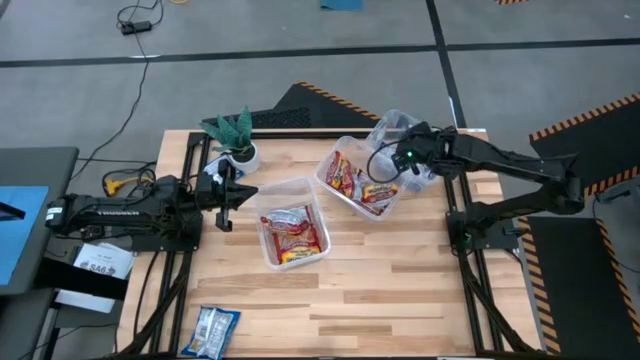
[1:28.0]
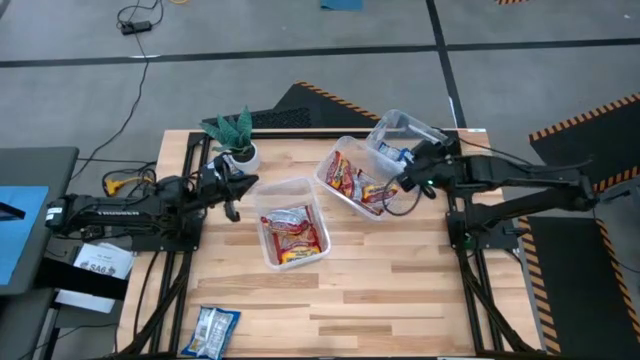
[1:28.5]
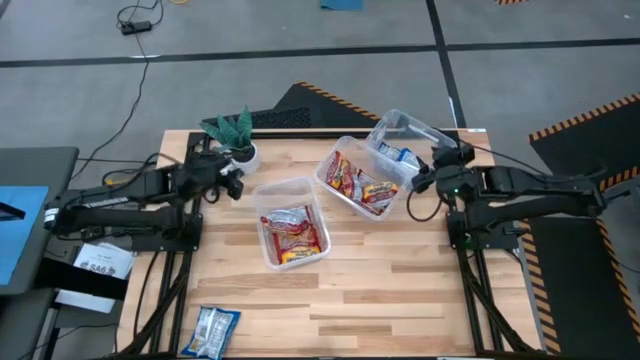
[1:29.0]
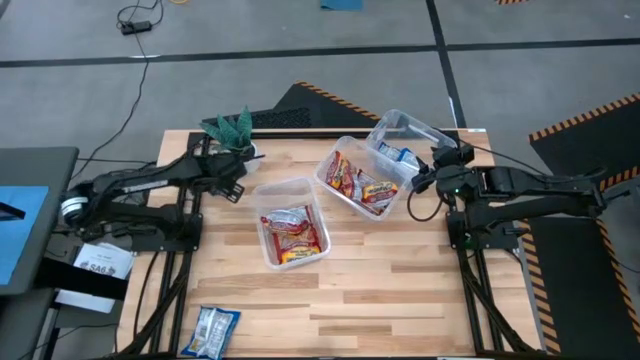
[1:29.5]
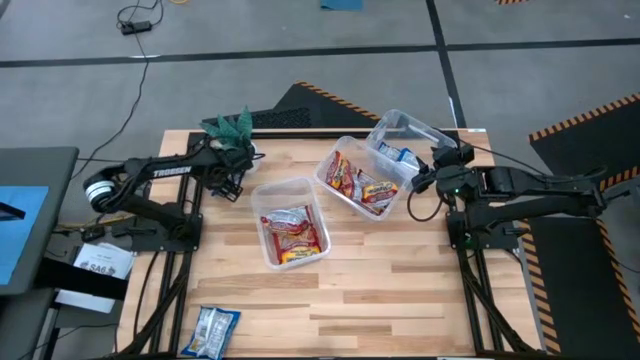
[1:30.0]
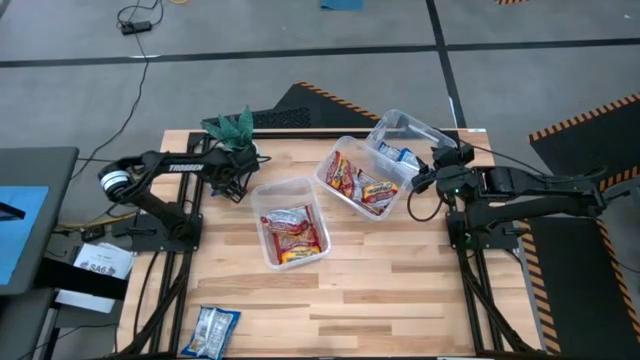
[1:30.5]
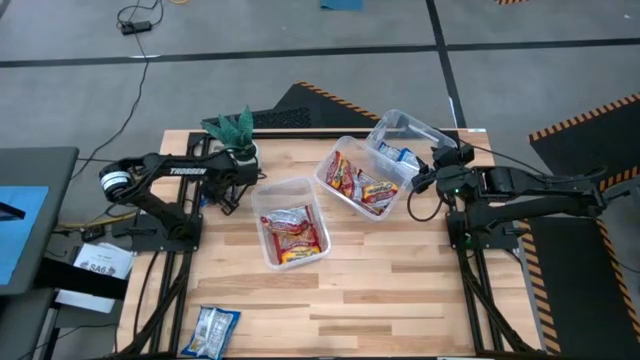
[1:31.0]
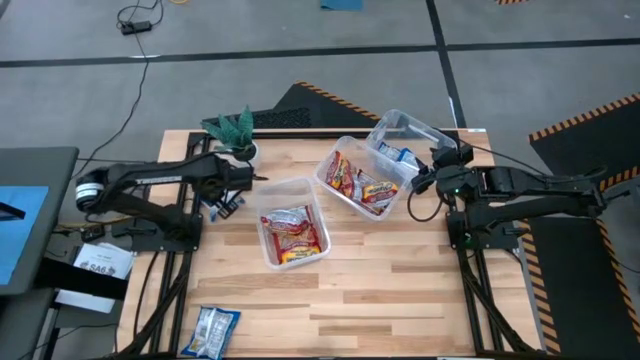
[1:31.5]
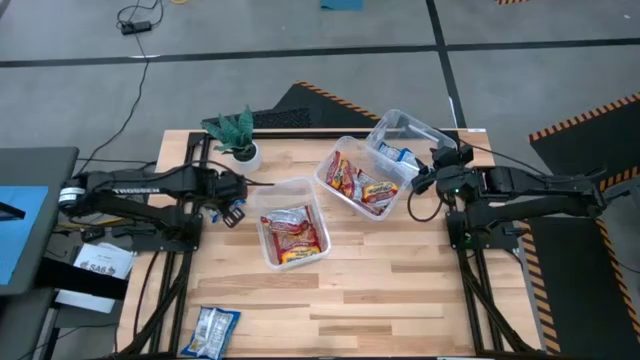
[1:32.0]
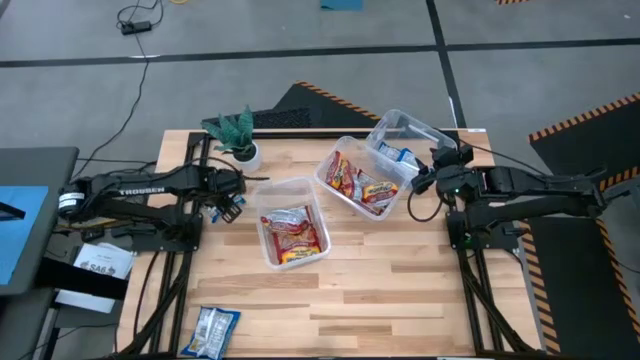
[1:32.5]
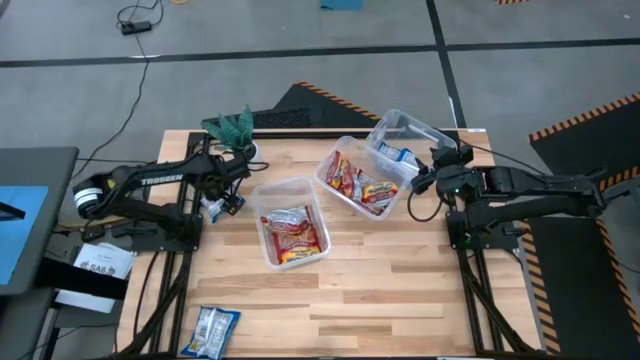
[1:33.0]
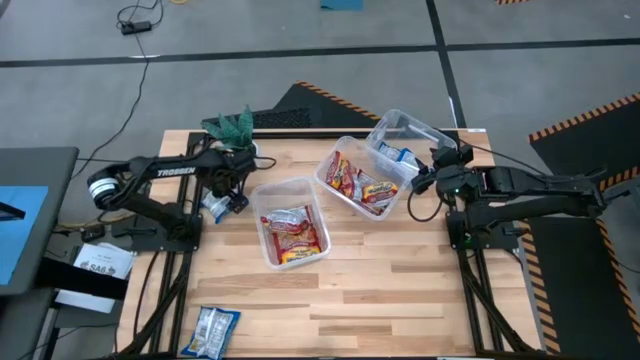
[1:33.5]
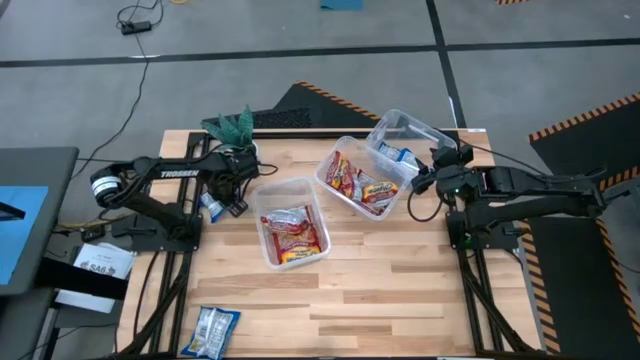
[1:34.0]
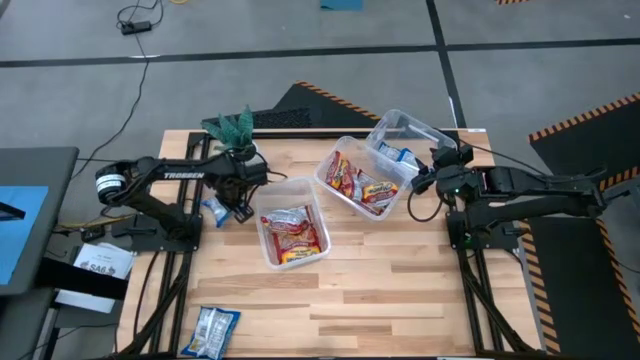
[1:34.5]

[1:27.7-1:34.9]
Task: Sort Maruchan noodles
Put the blue noodle pack into the top bin

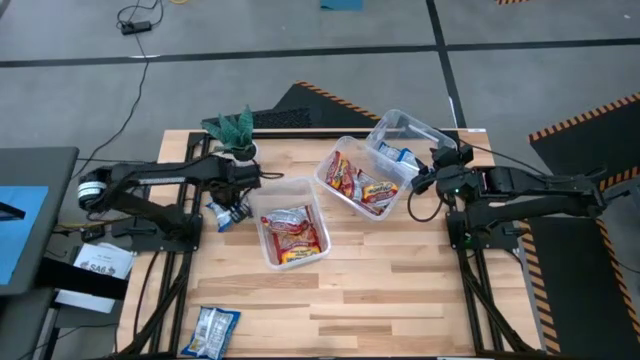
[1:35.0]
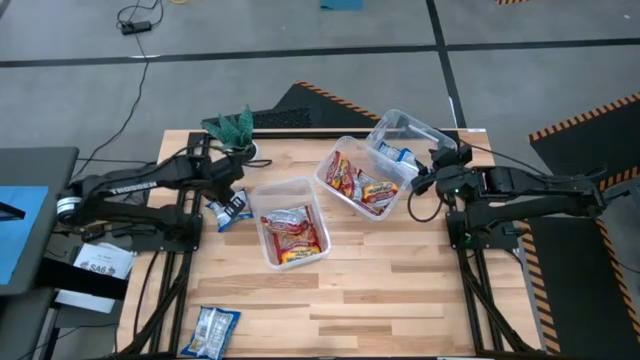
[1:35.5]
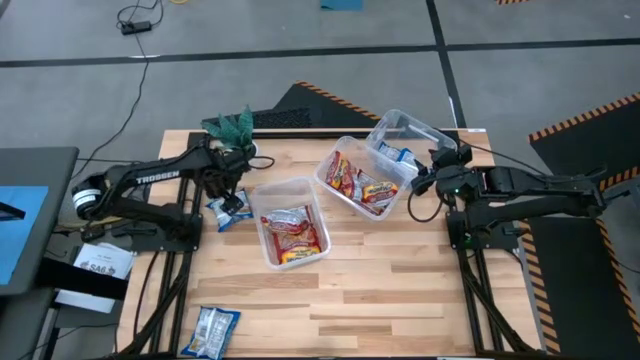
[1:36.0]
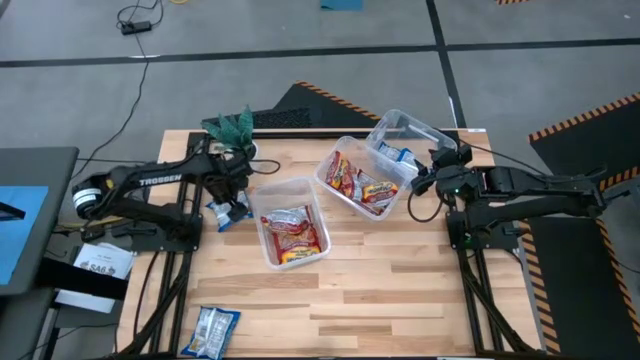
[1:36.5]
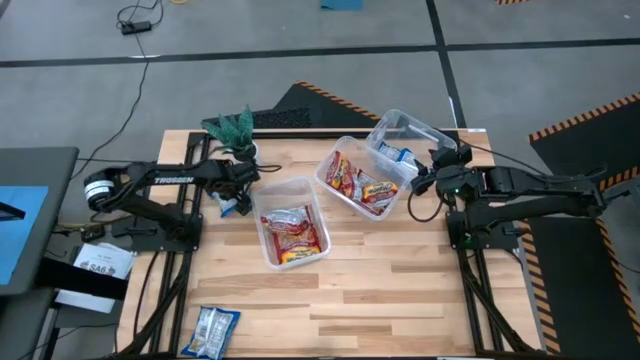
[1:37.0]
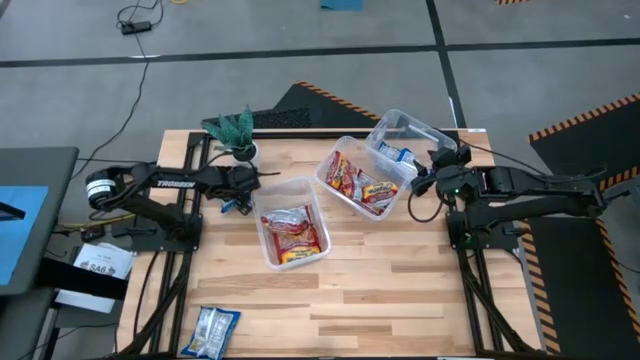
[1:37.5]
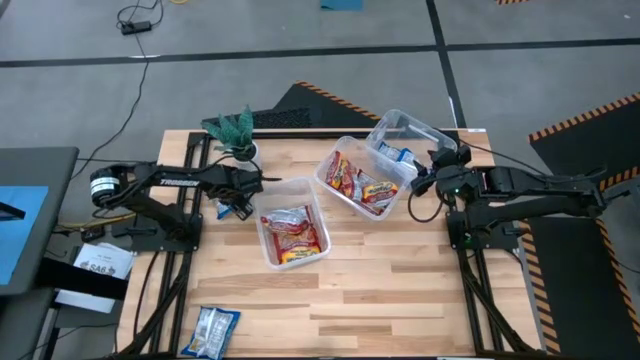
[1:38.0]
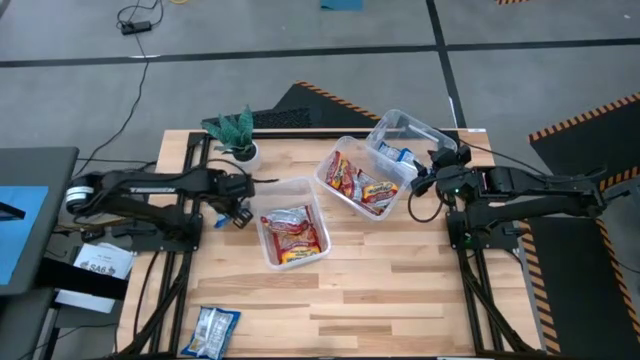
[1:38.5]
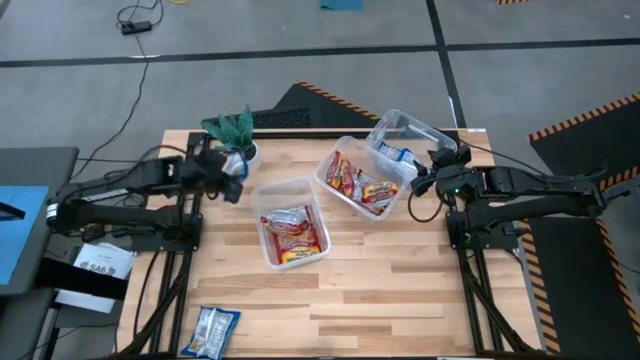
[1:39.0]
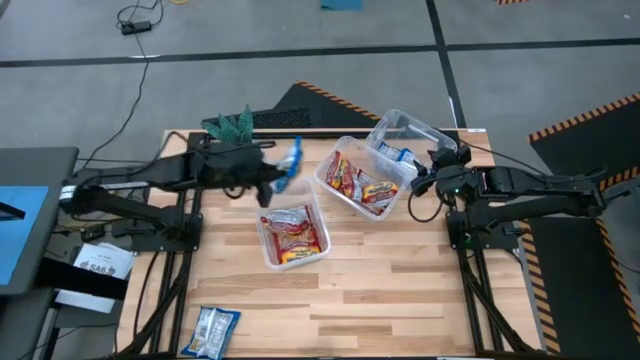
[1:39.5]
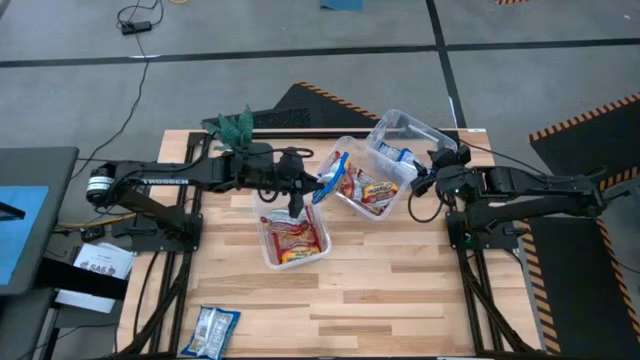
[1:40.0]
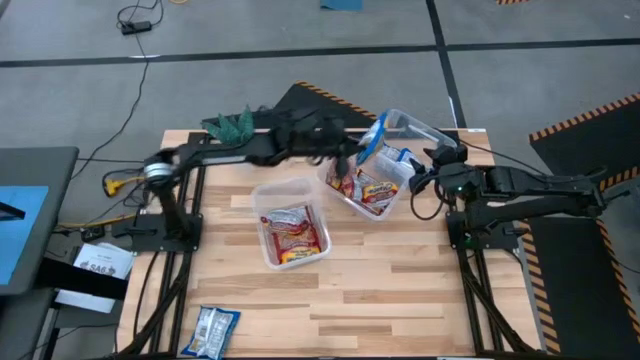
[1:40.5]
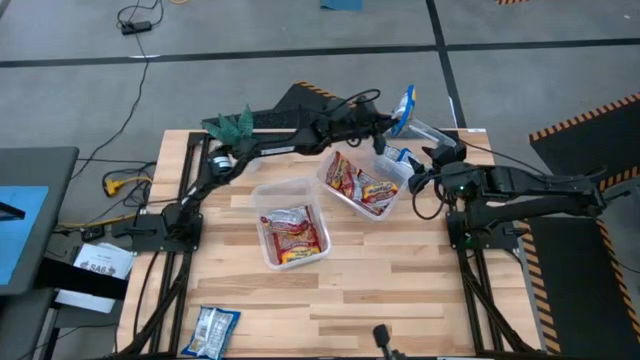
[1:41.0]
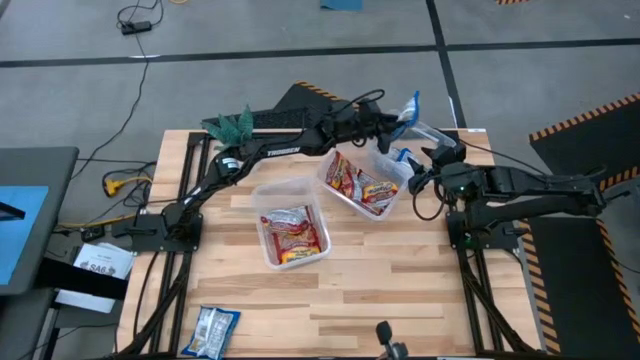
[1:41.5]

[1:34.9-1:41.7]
Put the blue noodle pack into the top bin

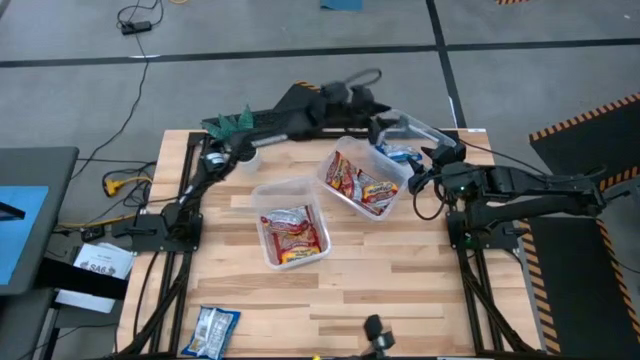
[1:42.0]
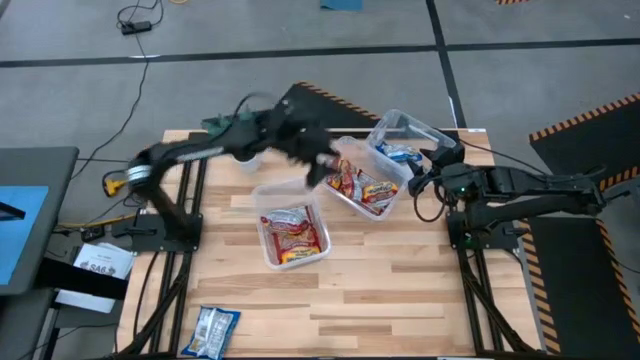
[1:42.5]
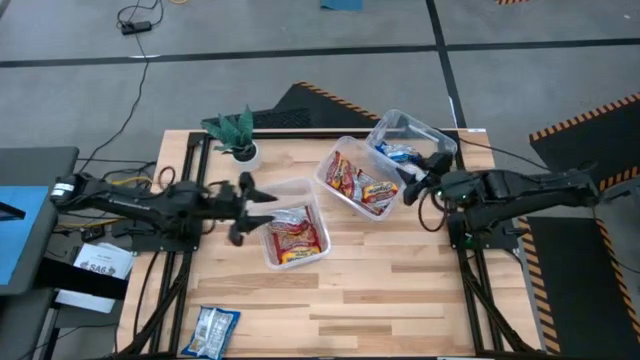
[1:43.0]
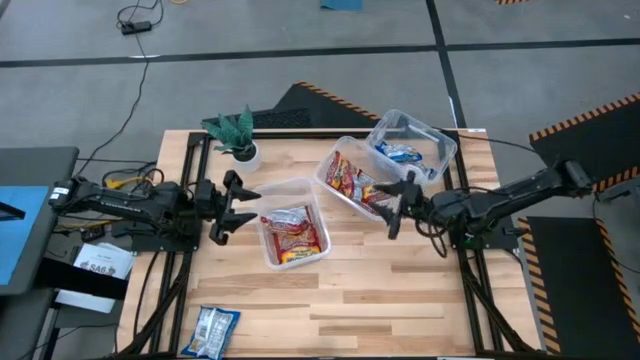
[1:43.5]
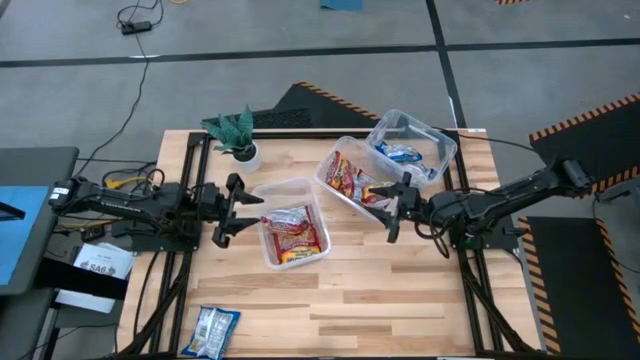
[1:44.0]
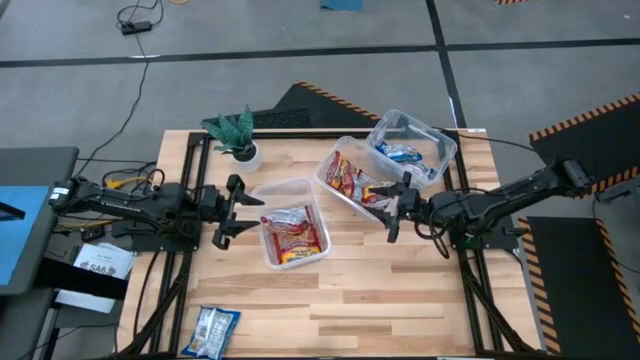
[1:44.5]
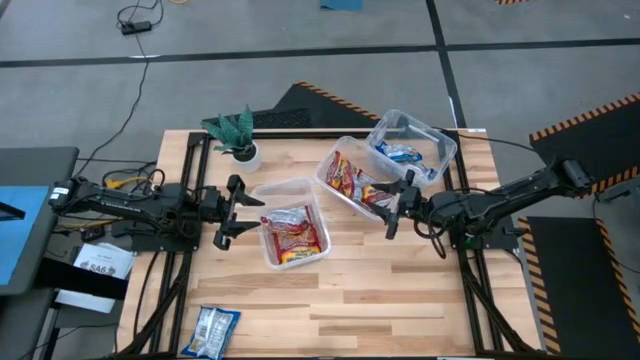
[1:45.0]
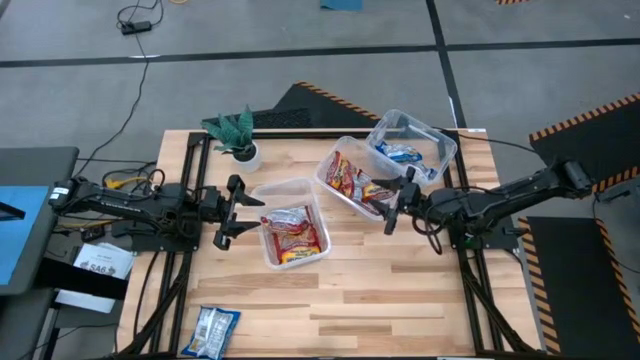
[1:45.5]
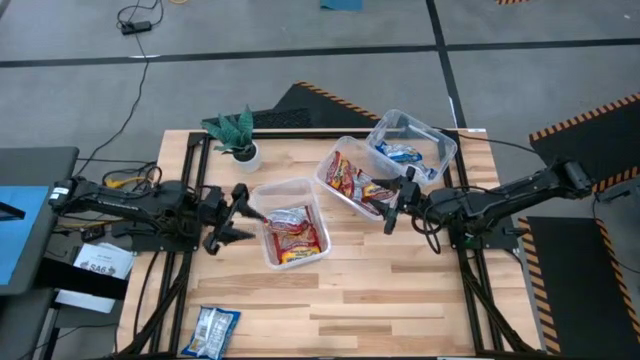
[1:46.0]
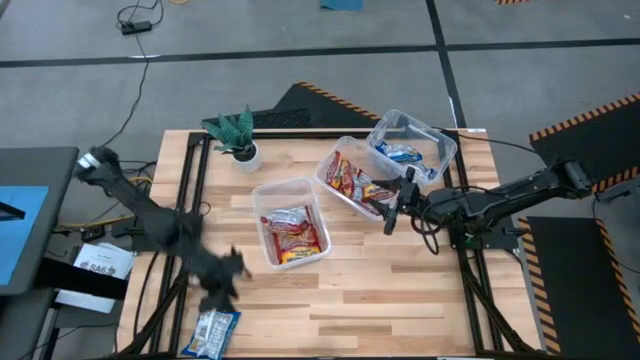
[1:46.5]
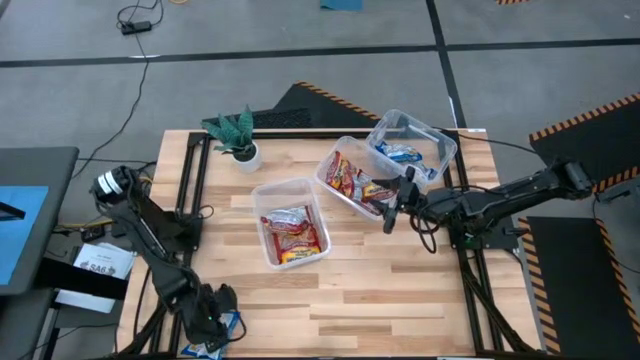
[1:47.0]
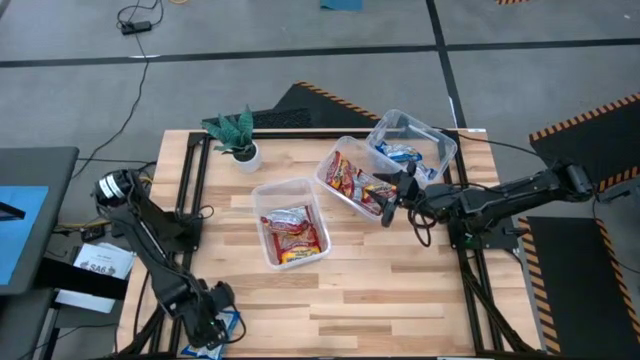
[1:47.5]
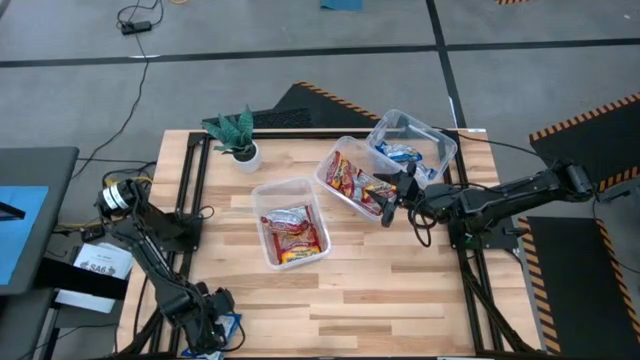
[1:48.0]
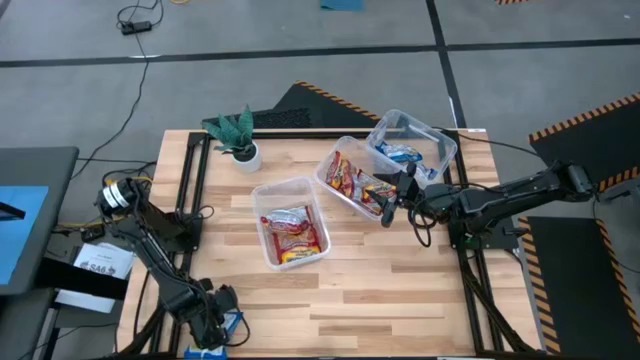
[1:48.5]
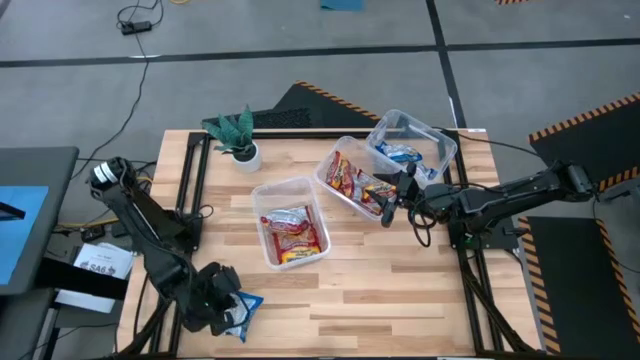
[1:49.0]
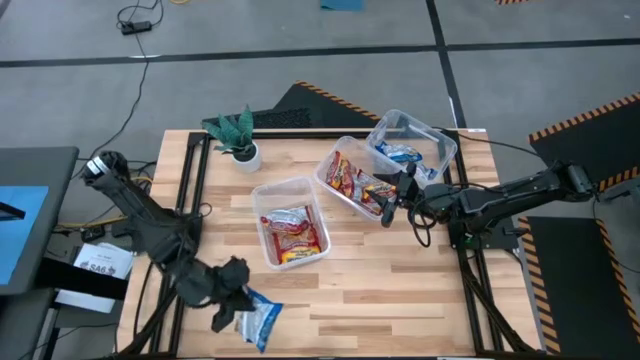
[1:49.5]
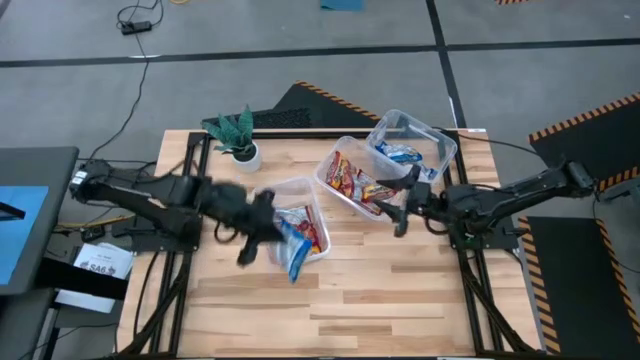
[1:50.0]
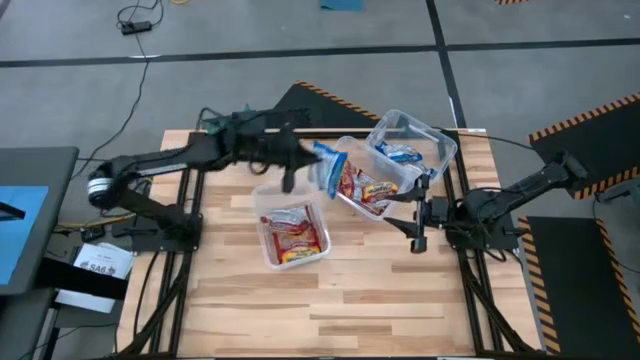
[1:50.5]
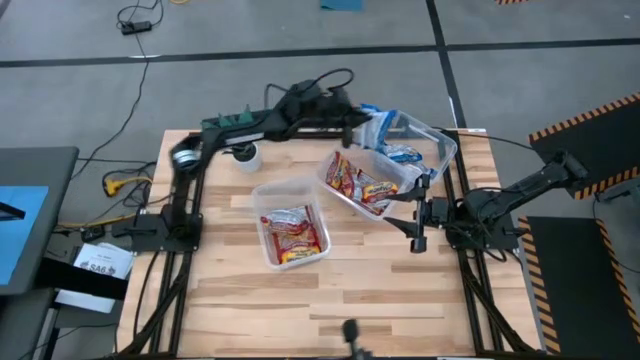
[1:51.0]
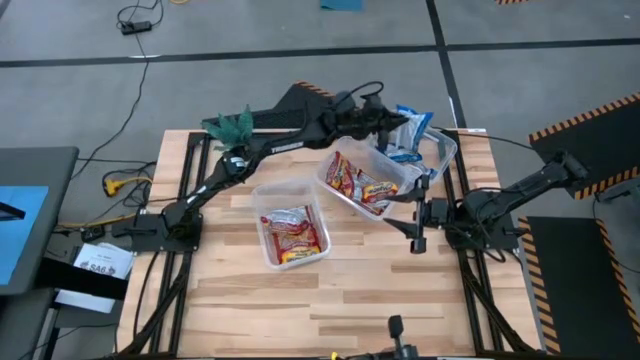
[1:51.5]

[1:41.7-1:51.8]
Put the blue noodle pack into the top bin
